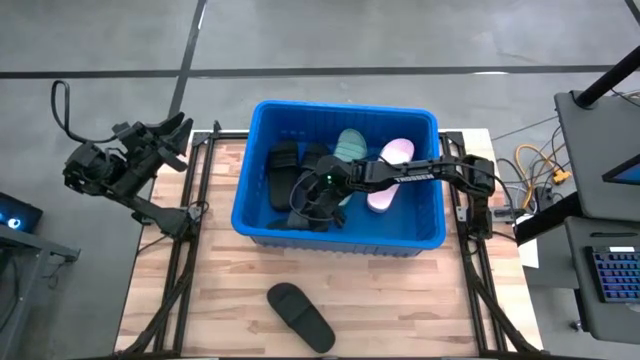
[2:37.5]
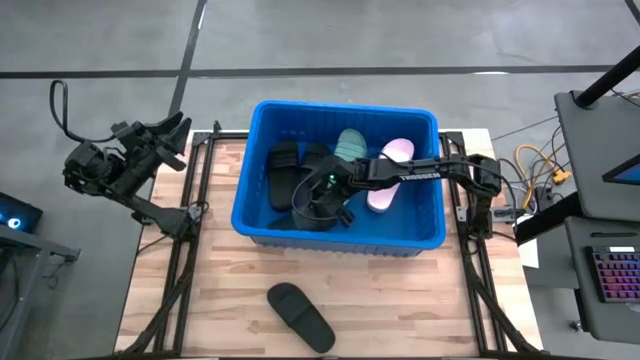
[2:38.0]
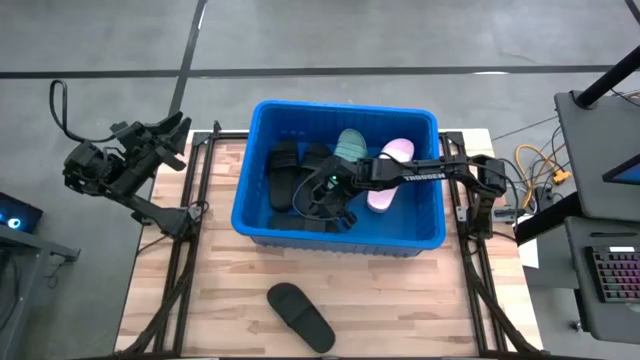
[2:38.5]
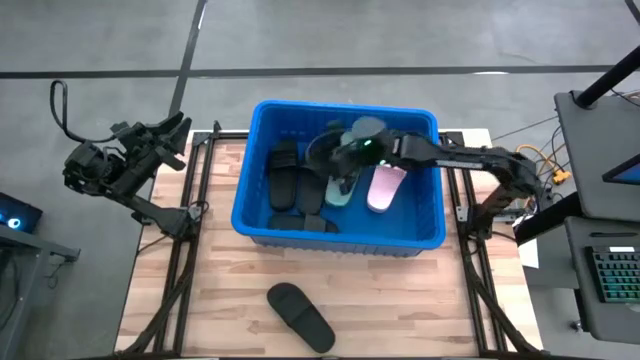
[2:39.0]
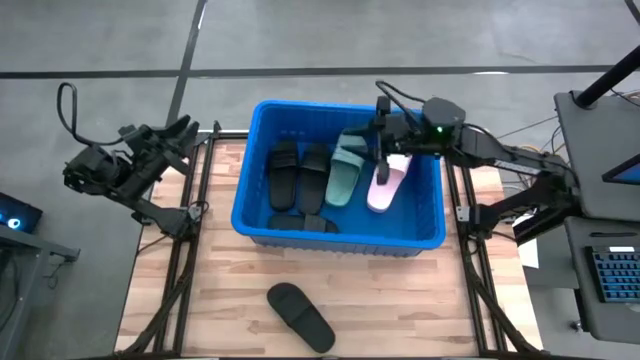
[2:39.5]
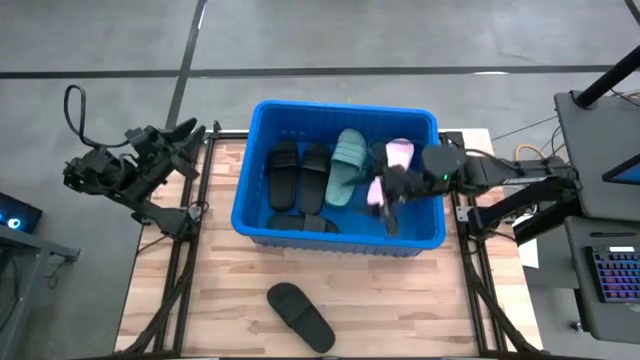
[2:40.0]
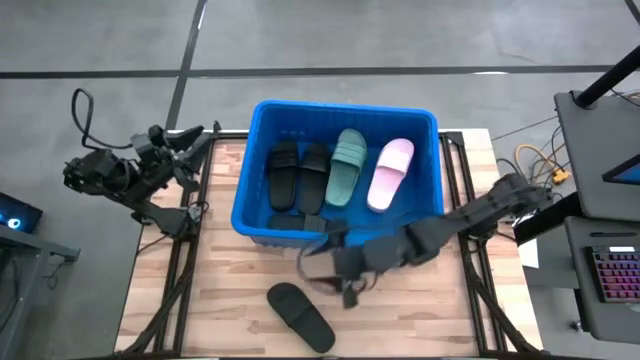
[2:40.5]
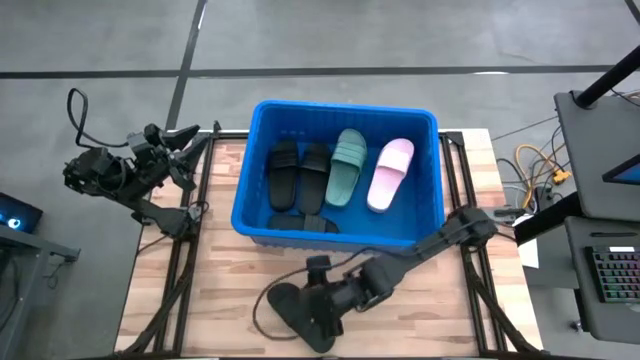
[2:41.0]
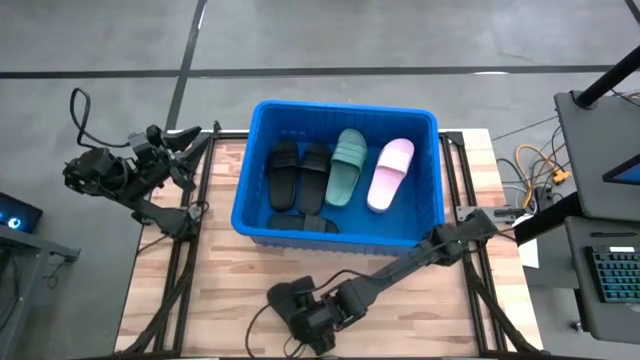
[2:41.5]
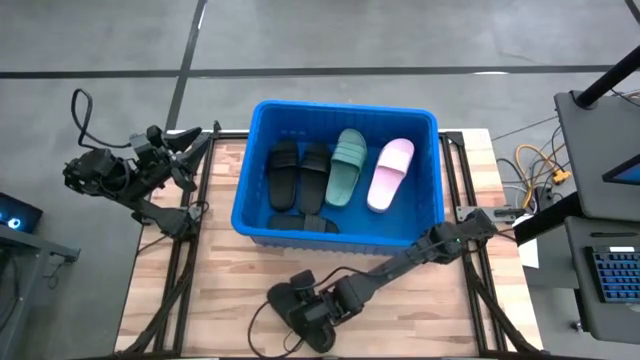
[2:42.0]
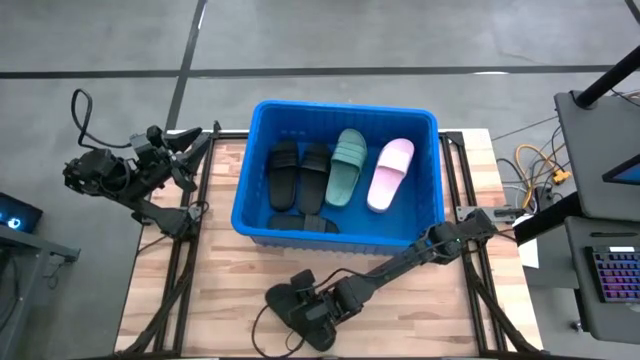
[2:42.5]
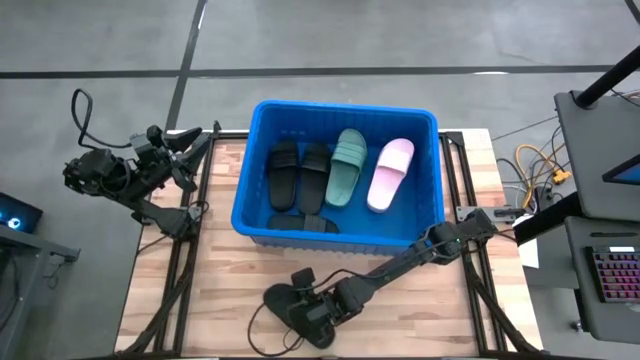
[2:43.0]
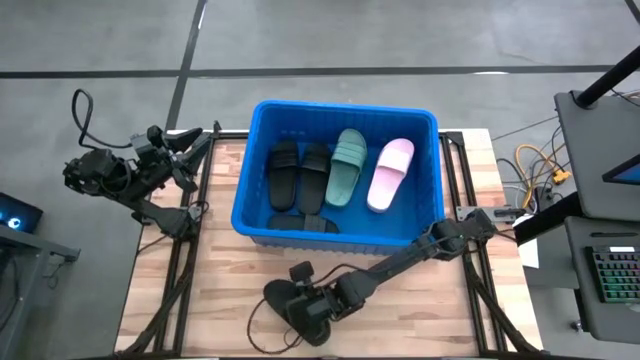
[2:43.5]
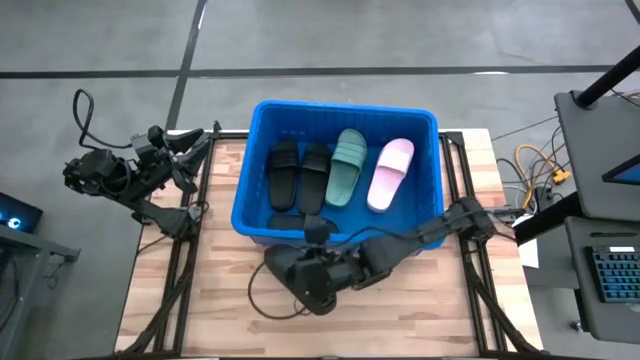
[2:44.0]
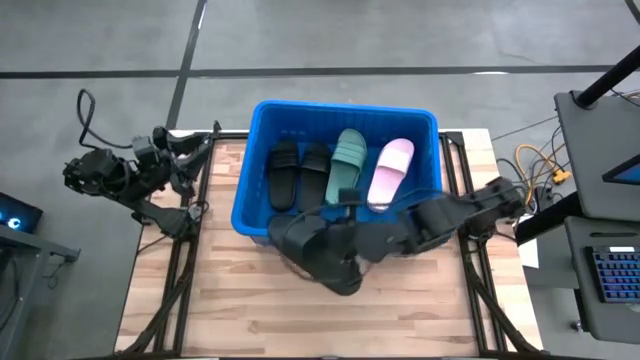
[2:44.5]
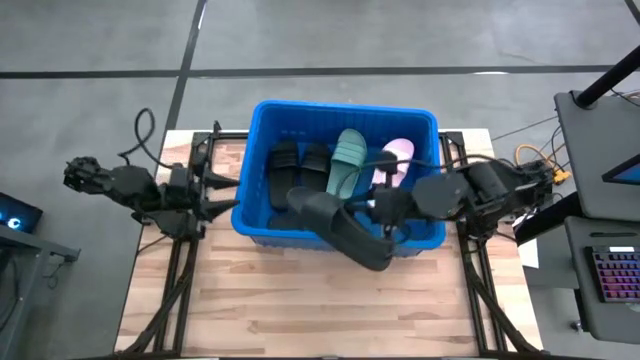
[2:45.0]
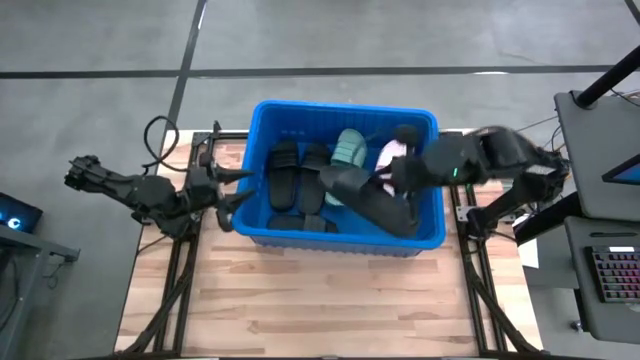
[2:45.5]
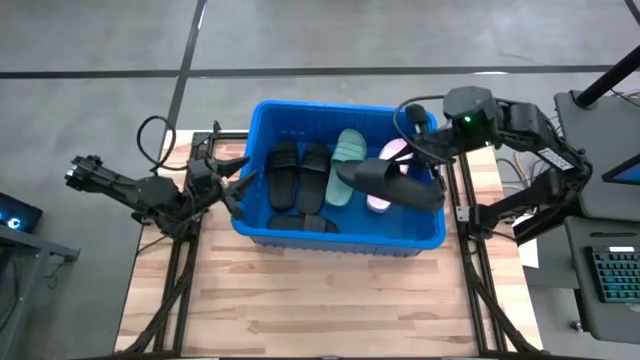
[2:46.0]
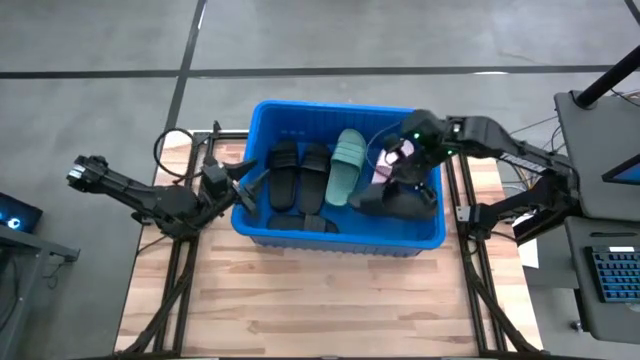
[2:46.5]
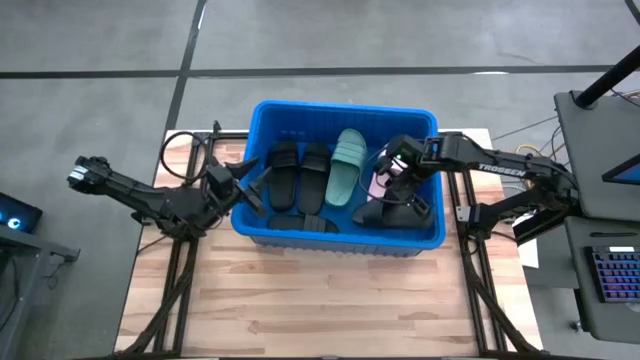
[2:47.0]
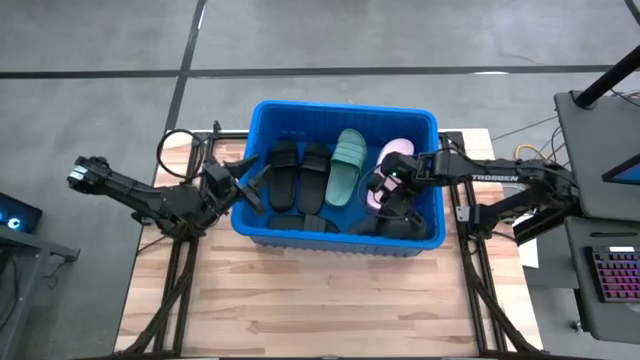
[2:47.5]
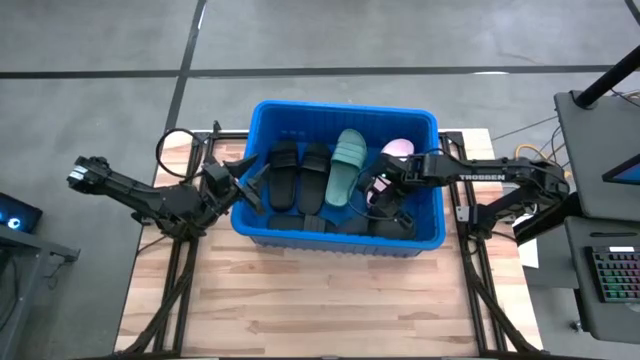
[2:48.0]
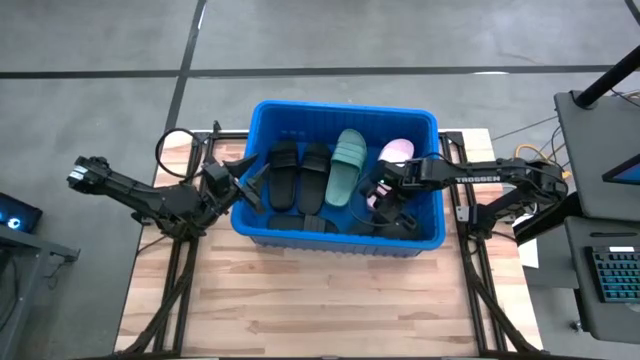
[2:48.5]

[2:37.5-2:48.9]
Task: Pick and place slides into bin
Put the black slide into the blue bin

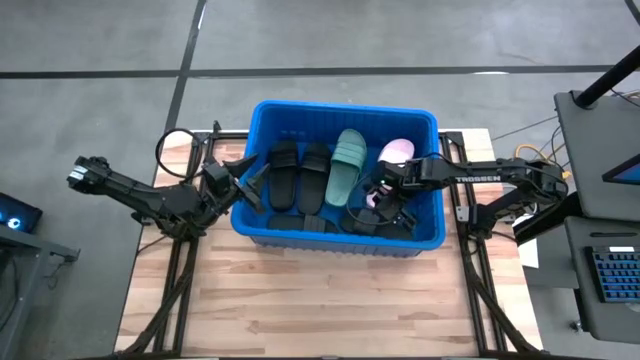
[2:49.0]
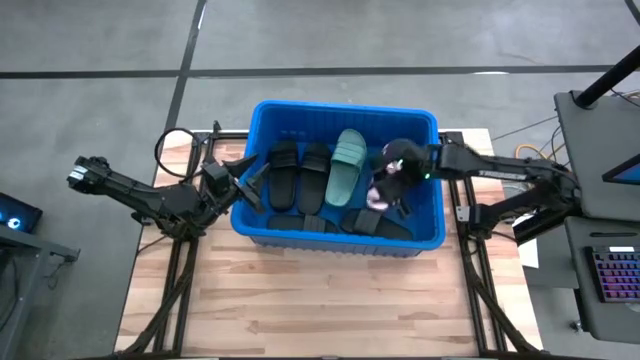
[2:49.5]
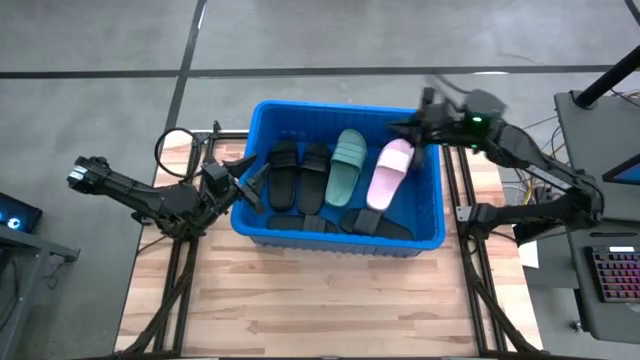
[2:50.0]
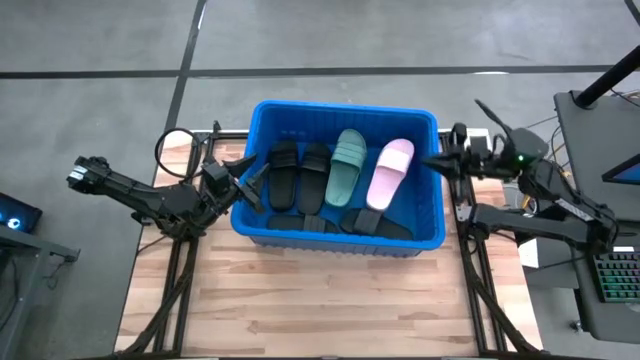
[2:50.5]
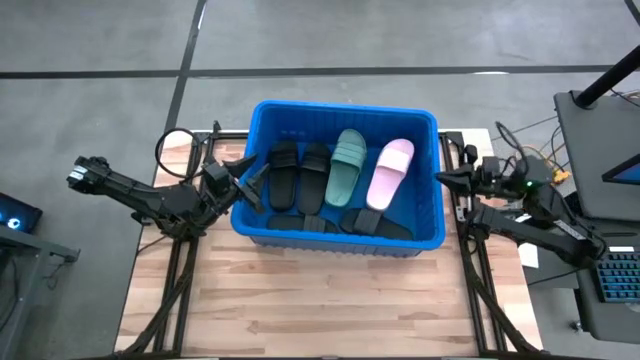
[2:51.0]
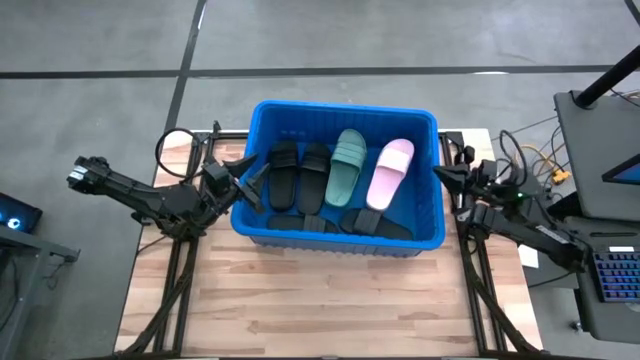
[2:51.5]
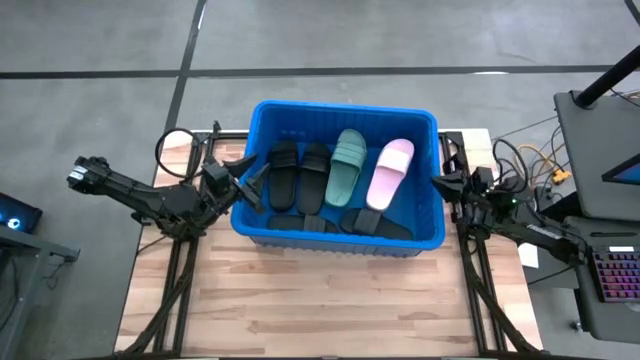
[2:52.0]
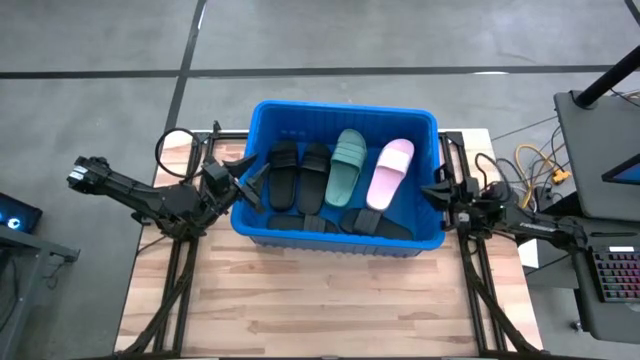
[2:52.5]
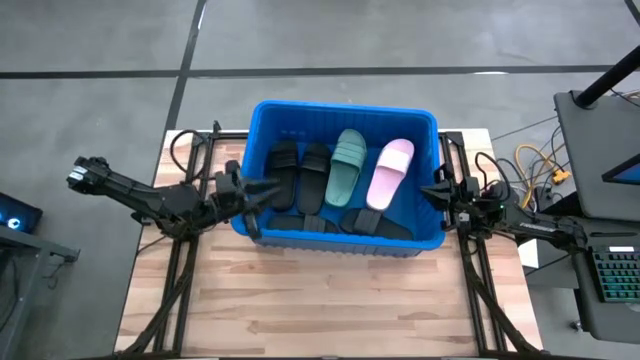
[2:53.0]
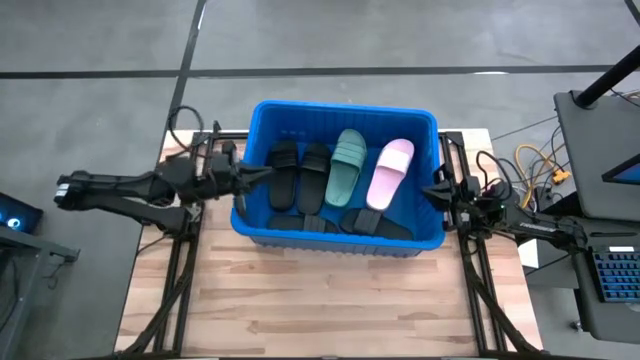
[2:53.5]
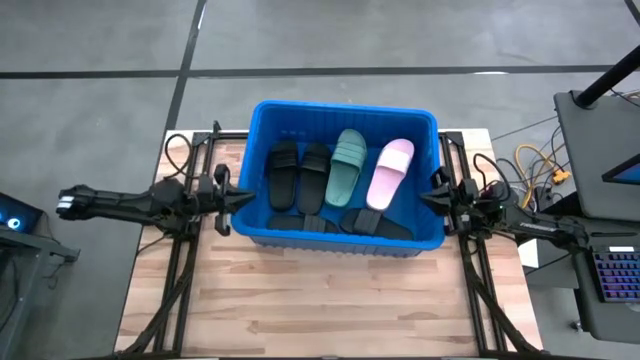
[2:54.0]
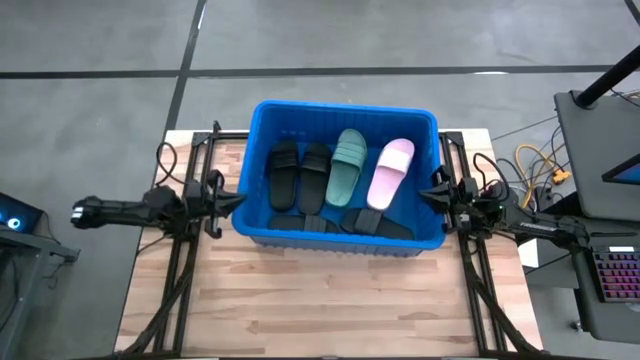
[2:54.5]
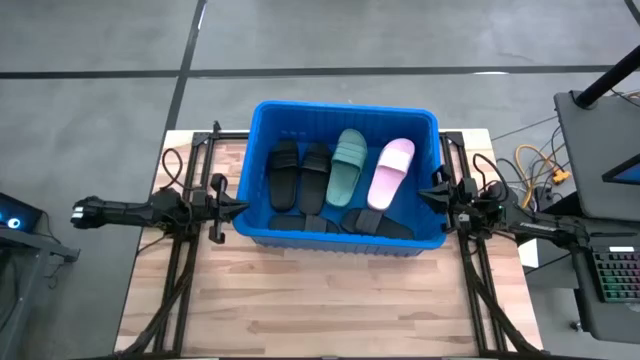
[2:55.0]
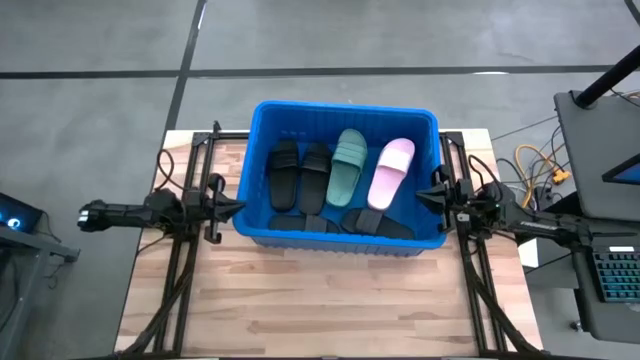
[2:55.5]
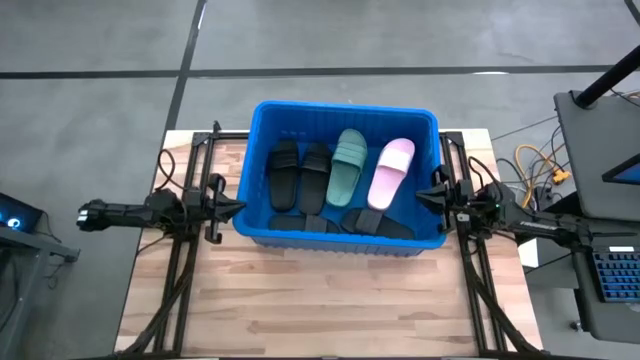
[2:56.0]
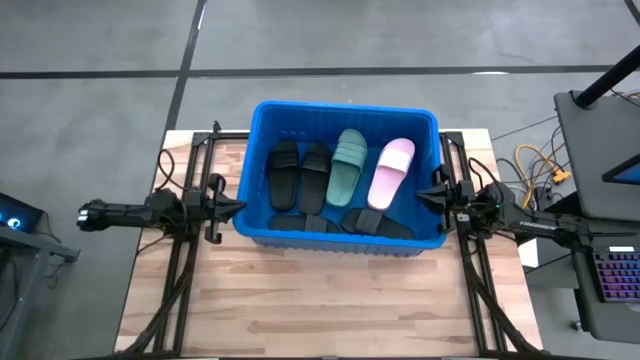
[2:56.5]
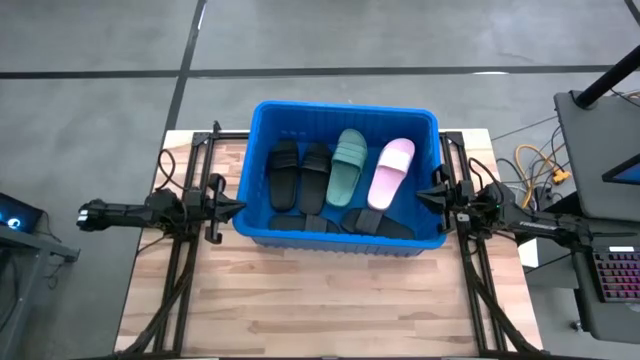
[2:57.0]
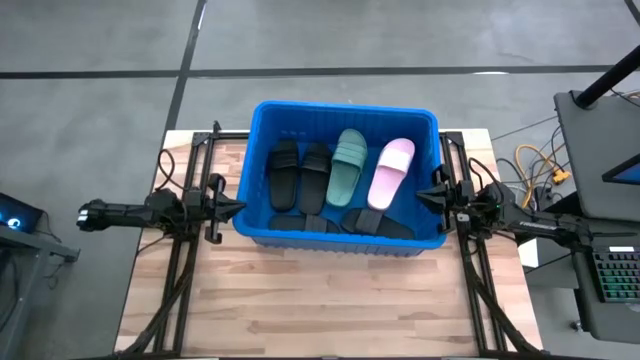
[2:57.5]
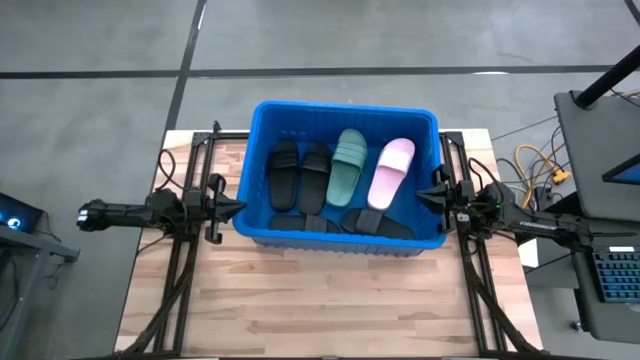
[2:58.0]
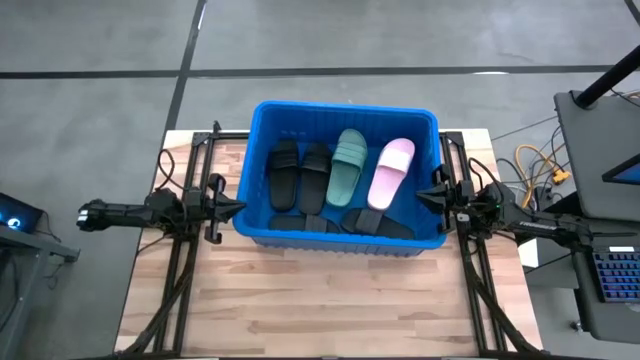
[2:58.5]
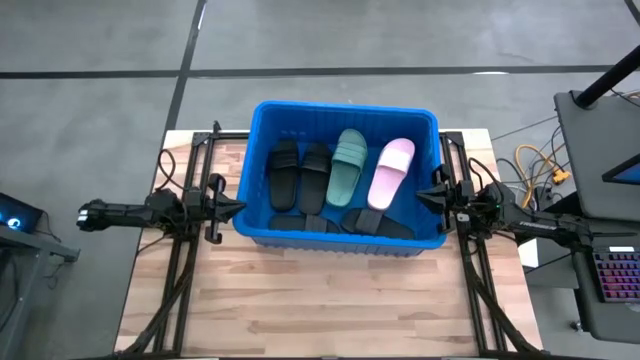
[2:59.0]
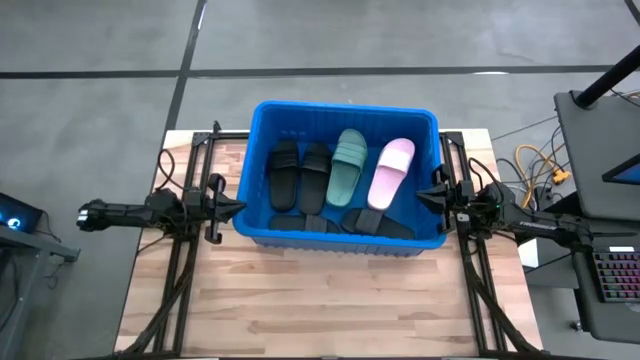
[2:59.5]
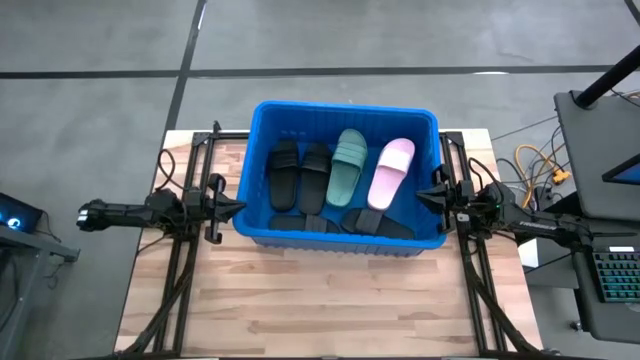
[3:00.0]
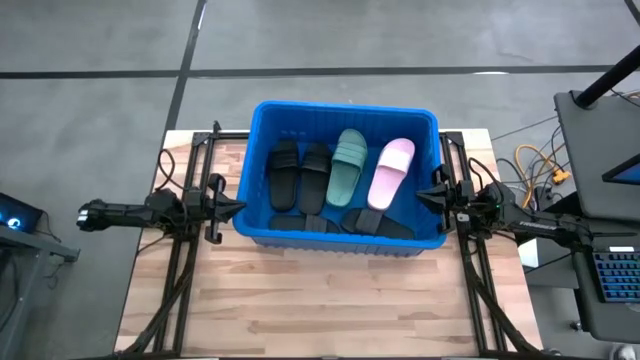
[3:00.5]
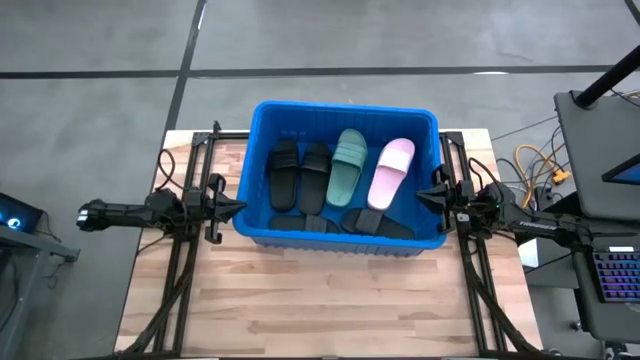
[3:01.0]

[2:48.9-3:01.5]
Return to Home Position
